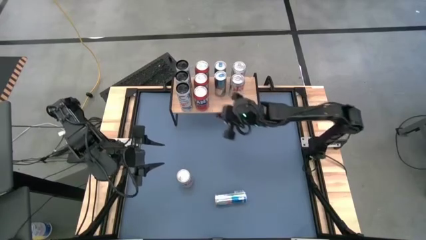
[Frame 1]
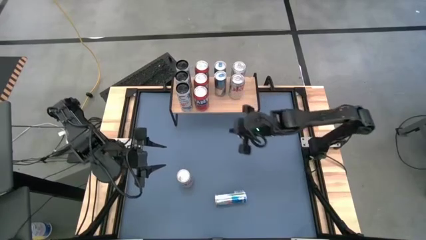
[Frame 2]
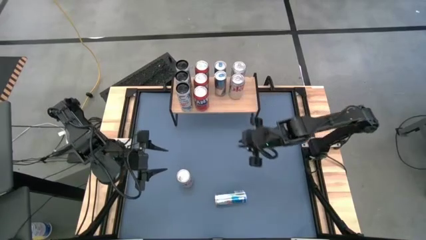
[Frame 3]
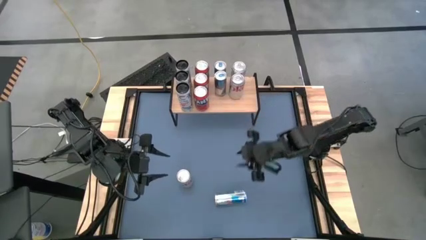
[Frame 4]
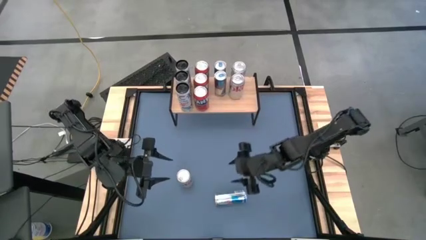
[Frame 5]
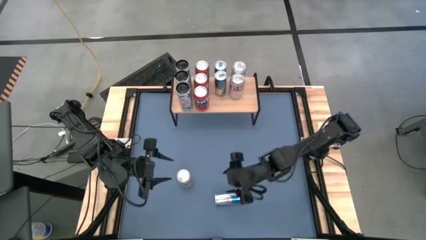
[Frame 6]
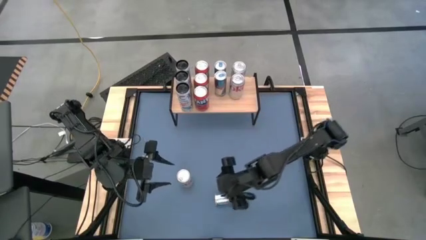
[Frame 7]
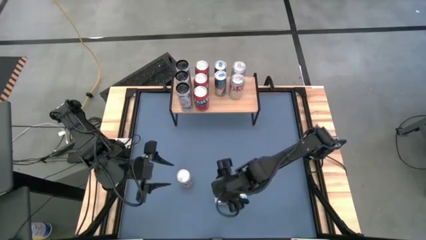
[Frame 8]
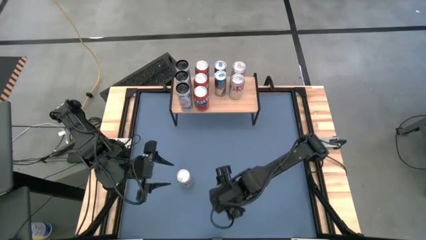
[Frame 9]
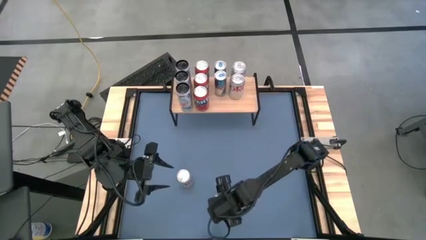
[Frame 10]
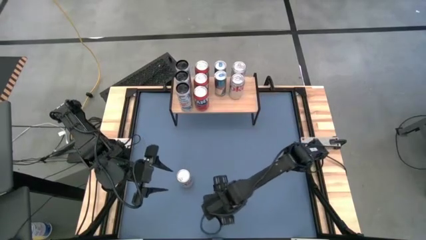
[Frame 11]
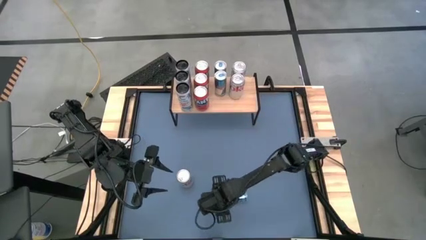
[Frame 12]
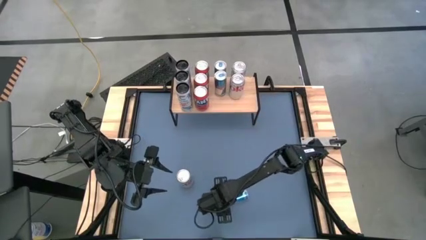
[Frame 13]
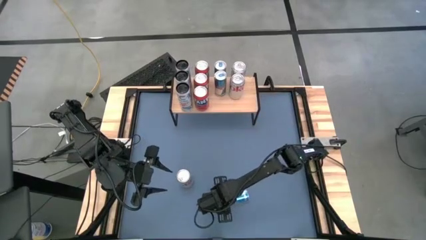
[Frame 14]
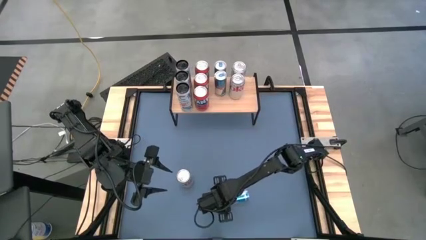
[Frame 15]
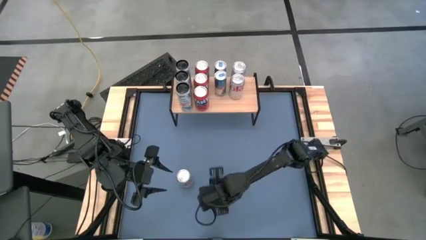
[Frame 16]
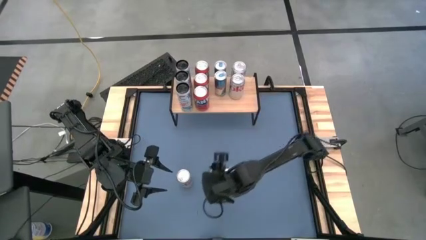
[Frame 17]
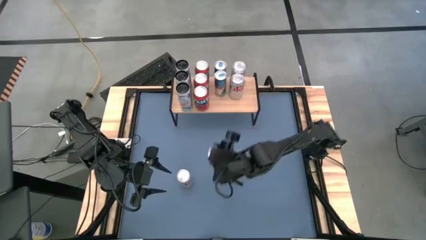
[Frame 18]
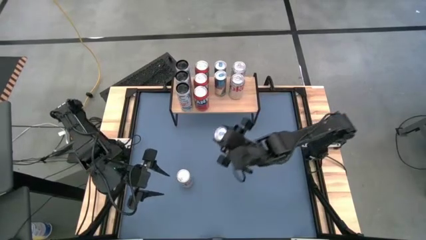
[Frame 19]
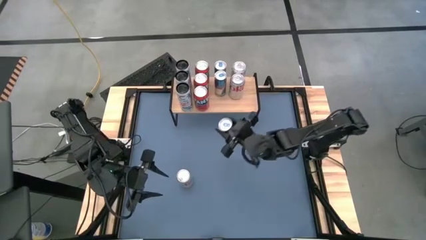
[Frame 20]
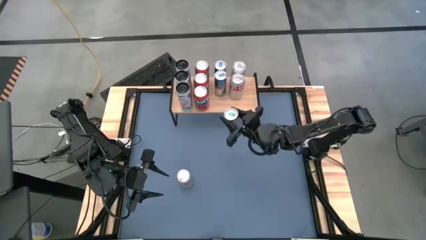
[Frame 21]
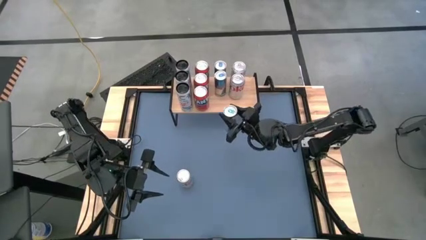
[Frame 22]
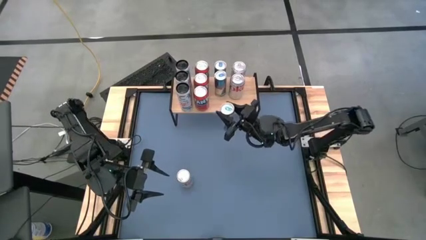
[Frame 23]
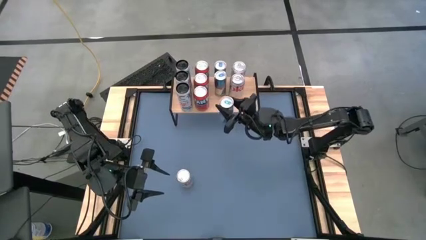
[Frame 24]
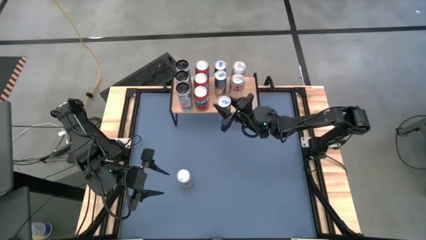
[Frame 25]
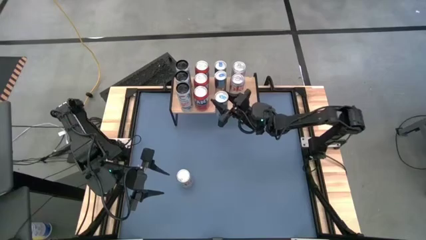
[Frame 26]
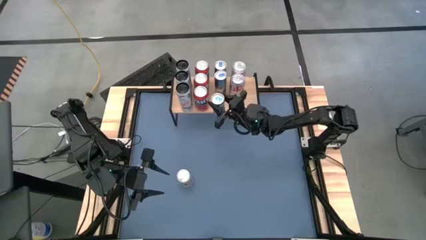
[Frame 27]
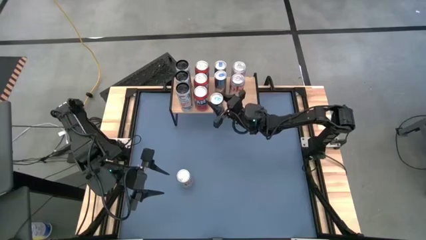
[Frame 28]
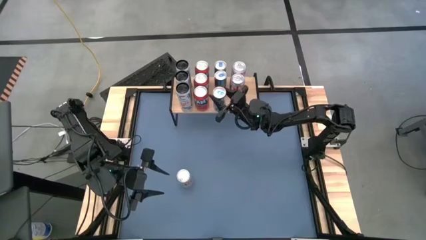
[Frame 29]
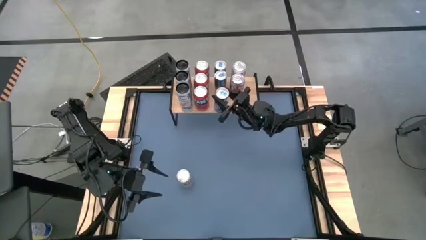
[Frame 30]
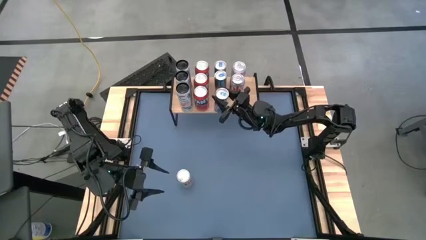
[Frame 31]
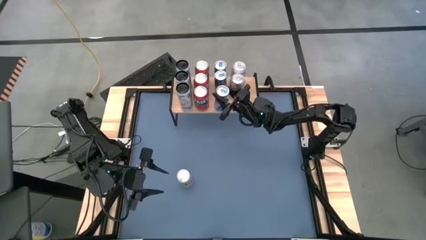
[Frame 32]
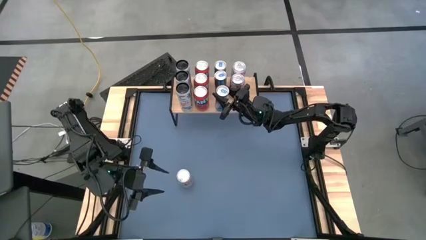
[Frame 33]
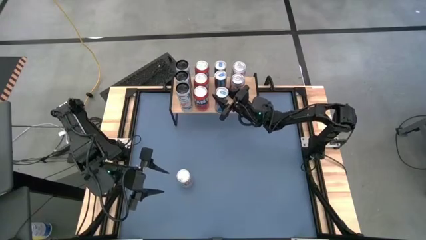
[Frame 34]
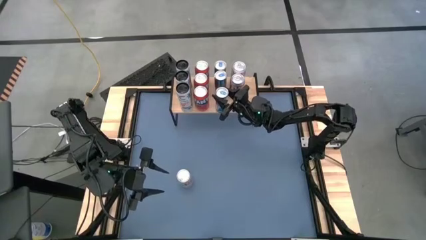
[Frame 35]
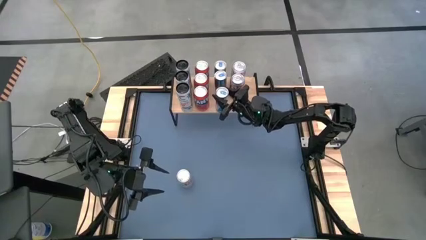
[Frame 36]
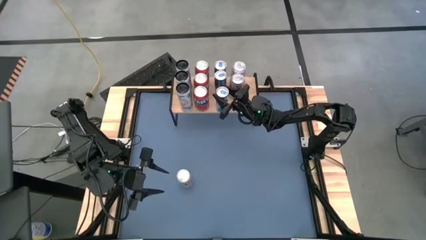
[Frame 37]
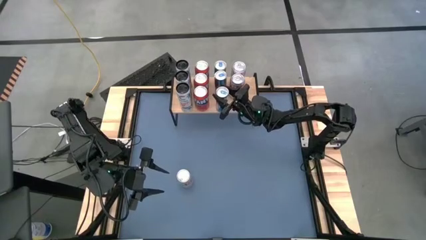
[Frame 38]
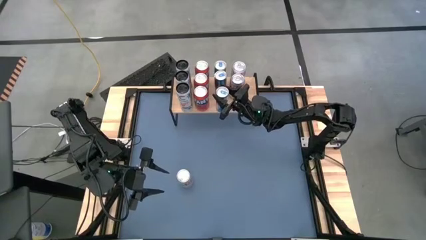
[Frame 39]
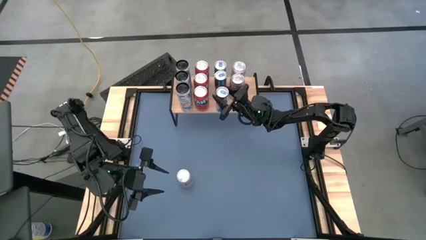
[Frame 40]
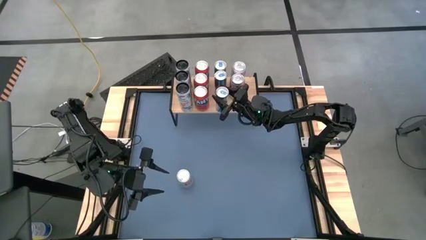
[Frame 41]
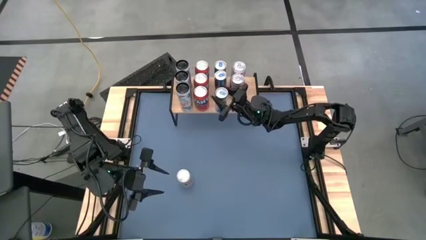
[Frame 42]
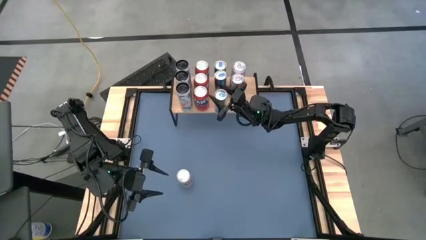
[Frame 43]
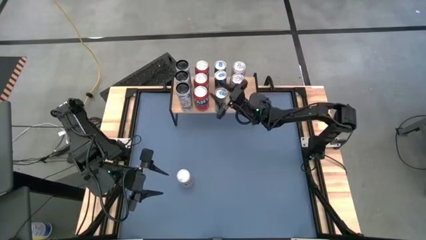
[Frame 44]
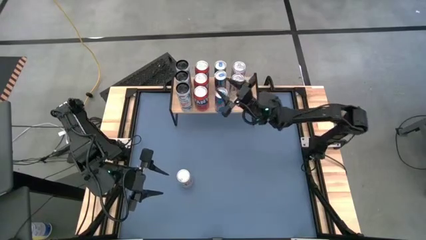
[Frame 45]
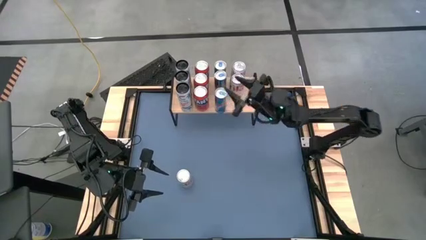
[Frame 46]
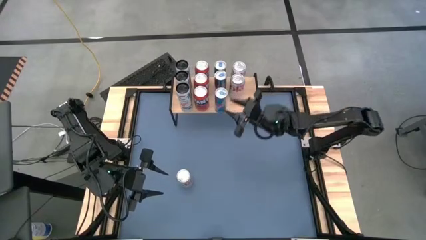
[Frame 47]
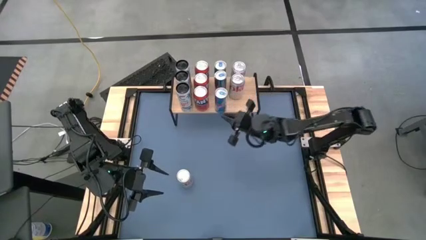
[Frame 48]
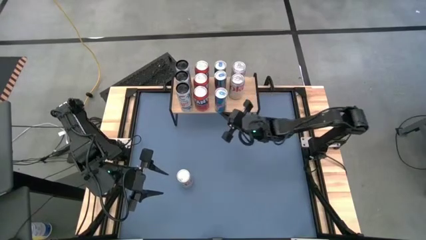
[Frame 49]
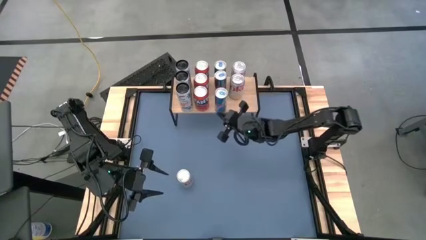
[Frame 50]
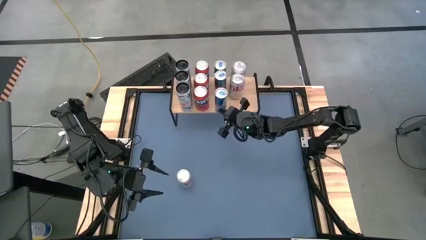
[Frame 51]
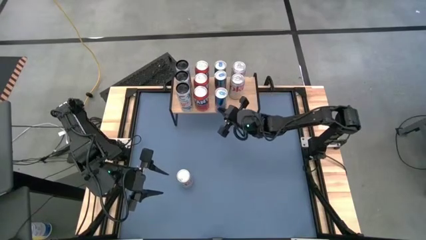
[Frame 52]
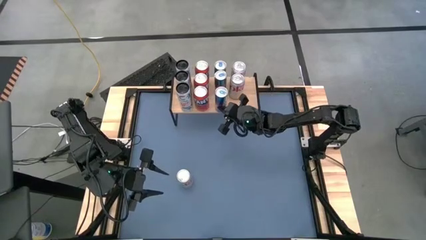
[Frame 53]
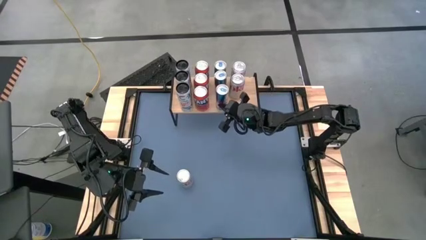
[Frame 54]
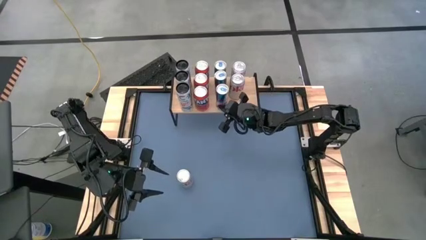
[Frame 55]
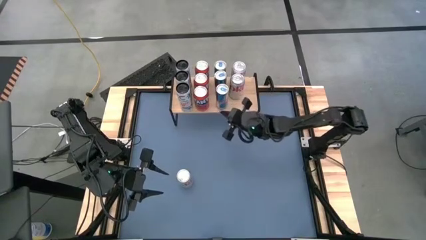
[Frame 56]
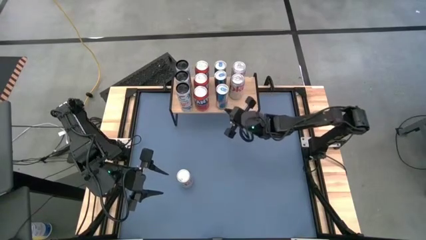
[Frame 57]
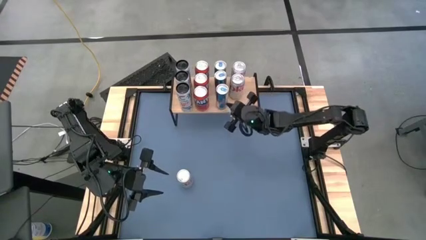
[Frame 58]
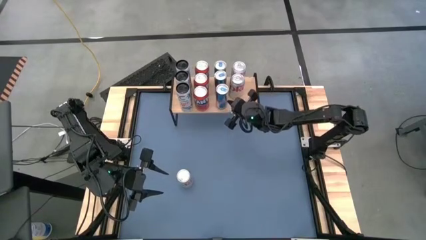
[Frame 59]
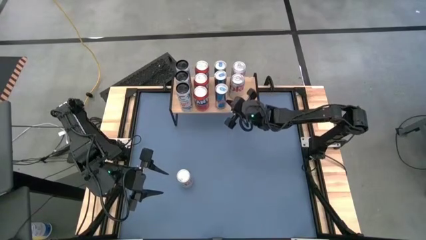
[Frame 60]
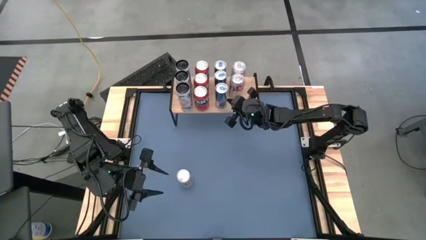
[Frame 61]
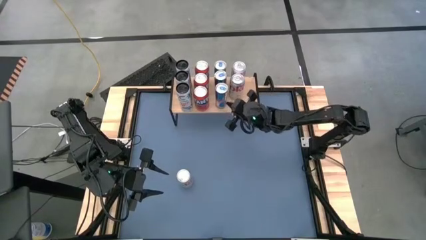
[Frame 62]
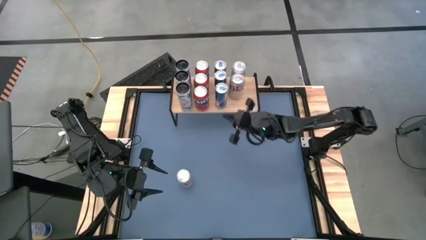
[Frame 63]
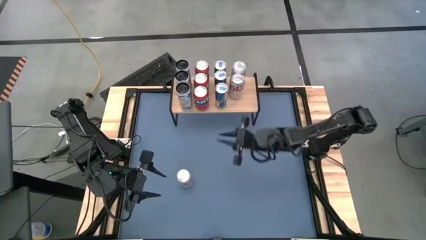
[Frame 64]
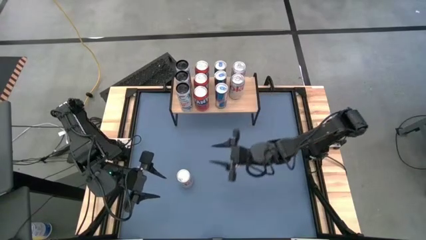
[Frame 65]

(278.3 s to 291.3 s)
Task: Place canned beverage on shelf
Put the blue soda can on the shelf

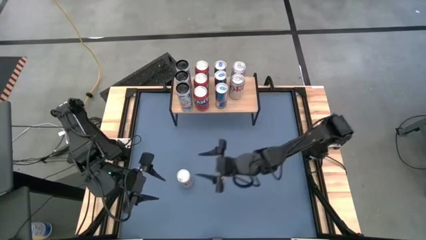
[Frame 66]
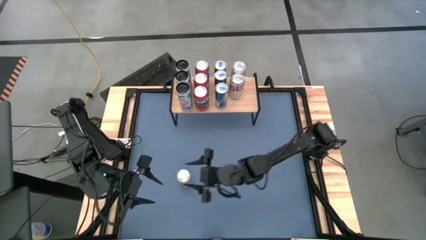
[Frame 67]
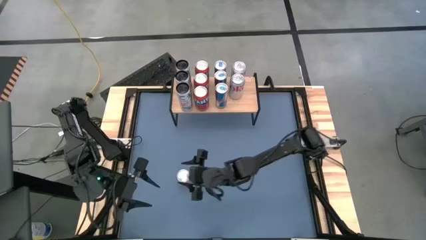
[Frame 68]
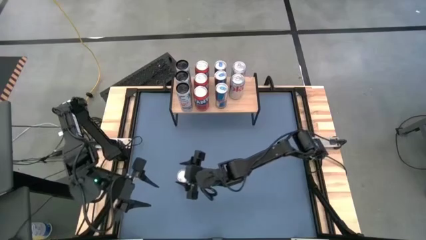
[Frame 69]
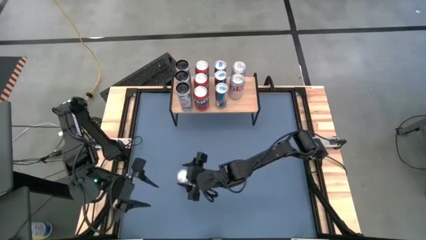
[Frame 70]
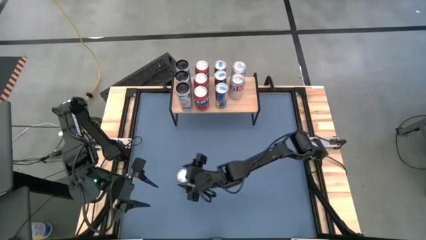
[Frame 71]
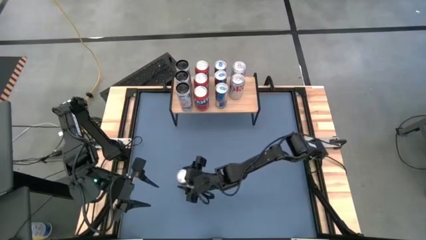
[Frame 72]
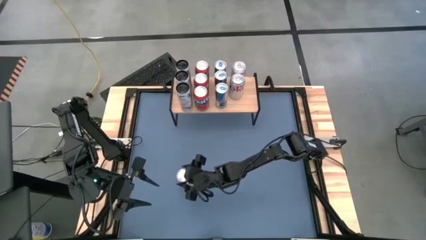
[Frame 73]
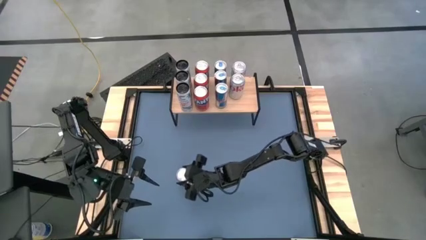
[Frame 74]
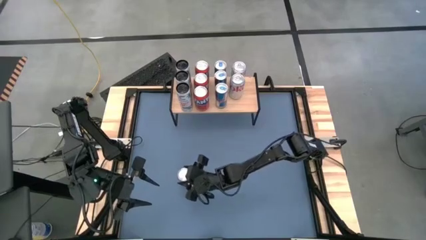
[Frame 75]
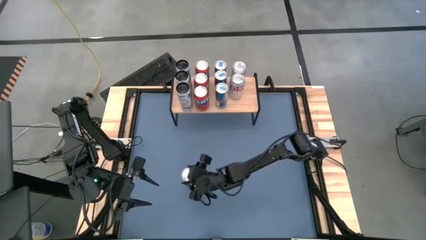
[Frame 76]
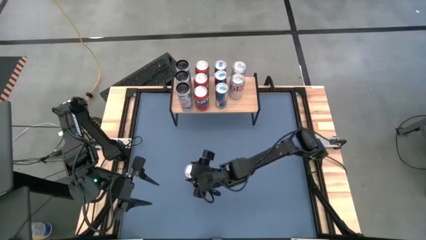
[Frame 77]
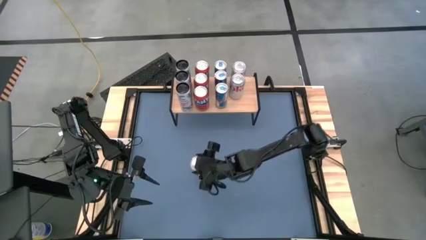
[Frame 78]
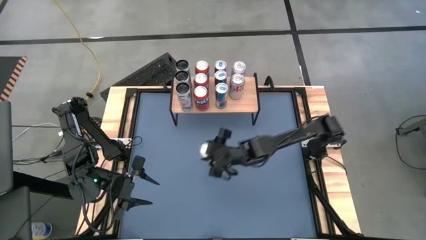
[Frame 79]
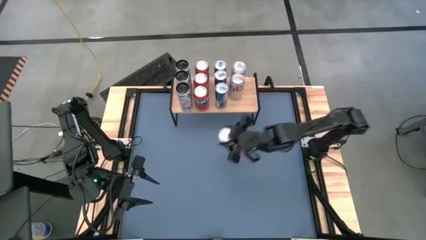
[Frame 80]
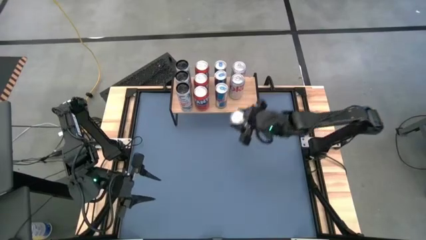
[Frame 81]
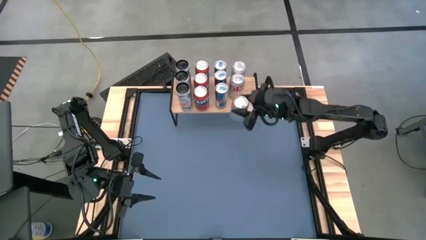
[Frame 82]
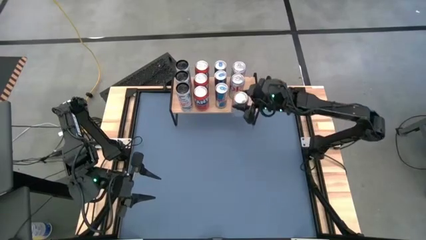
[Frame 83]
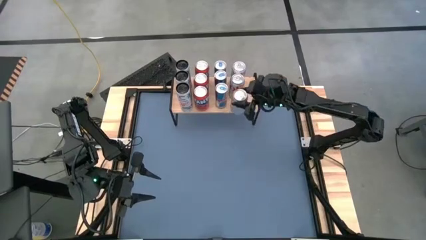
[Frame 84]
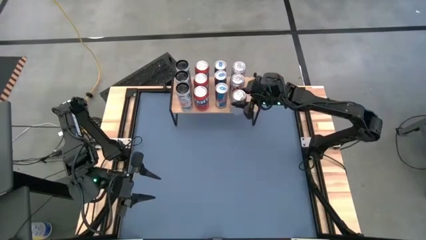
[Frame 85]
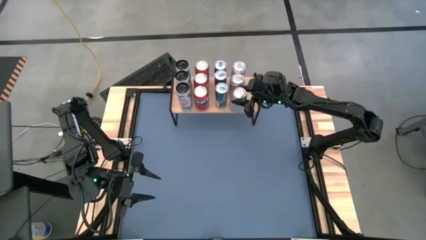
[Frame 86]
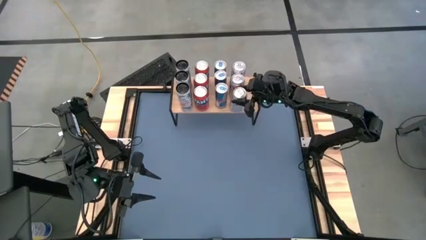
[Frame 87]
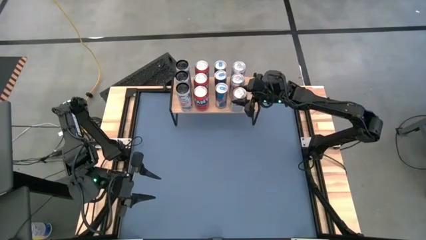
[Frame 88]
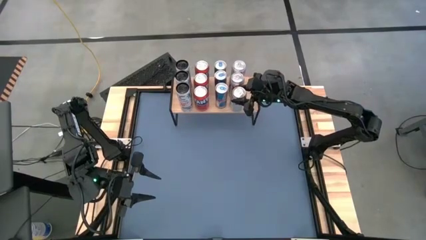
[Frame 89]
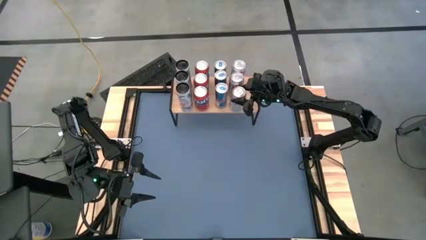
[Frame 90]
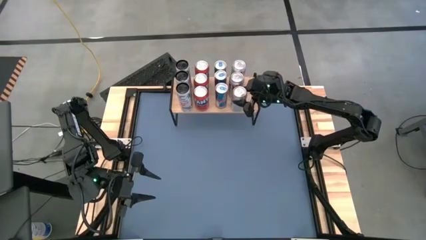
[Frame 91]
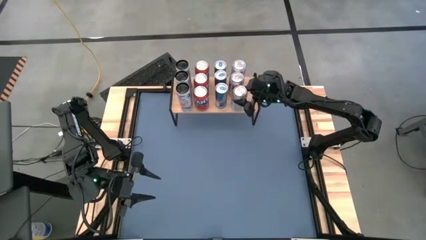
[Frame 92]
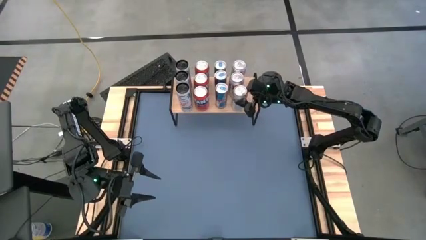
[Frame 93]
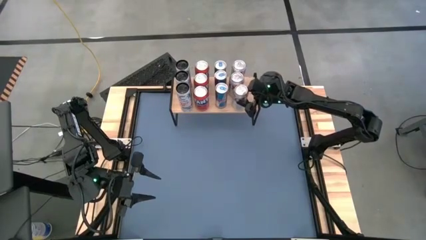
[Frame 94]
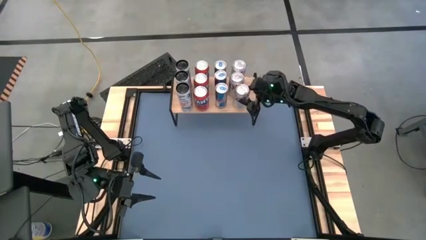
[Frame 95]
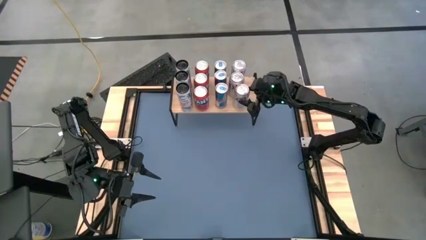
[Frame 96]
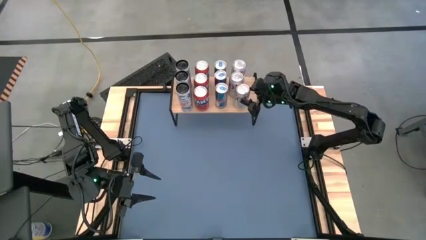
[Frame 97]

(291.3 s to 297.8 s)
Put the white soda can on the shelf
